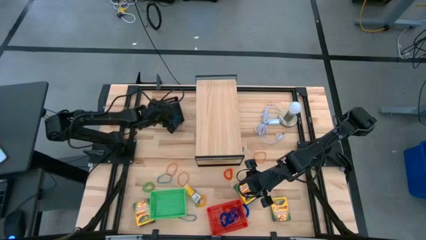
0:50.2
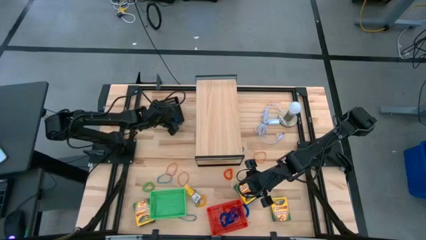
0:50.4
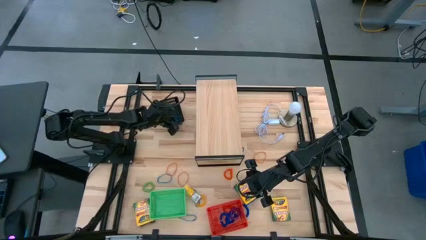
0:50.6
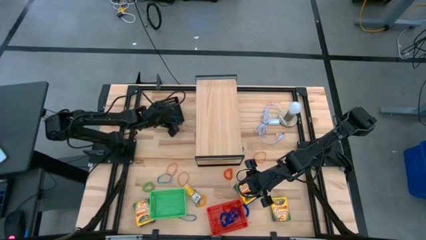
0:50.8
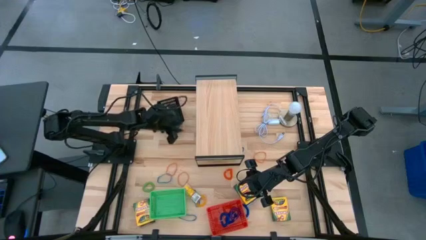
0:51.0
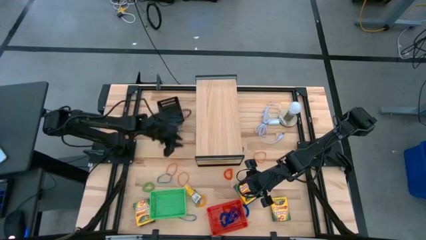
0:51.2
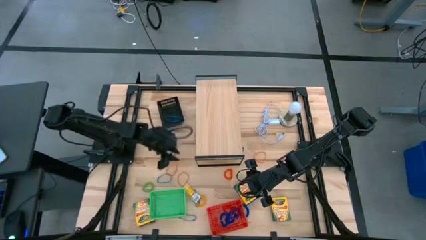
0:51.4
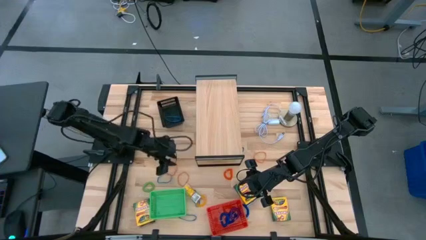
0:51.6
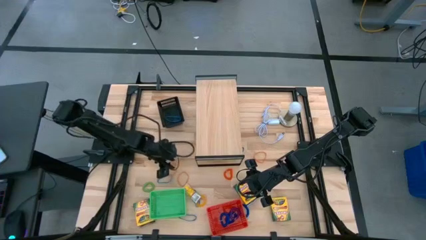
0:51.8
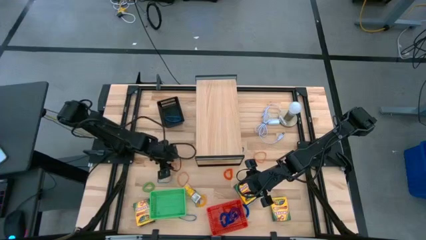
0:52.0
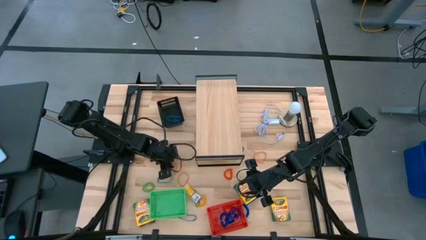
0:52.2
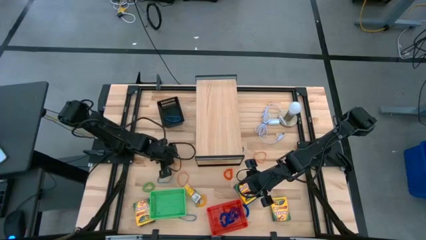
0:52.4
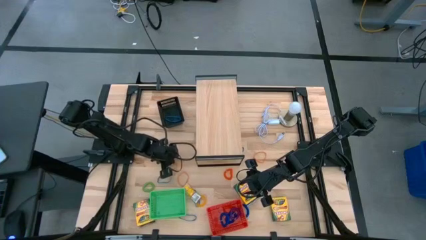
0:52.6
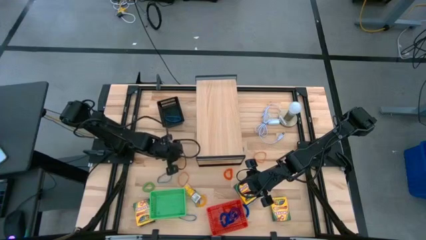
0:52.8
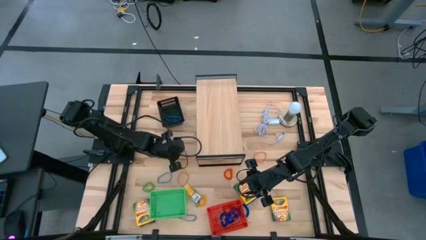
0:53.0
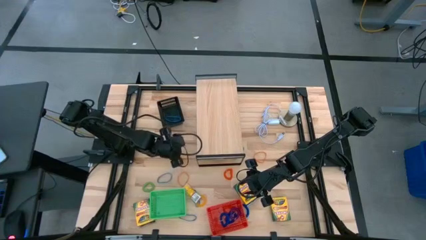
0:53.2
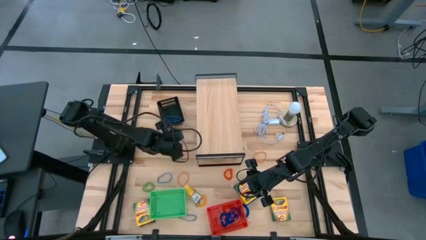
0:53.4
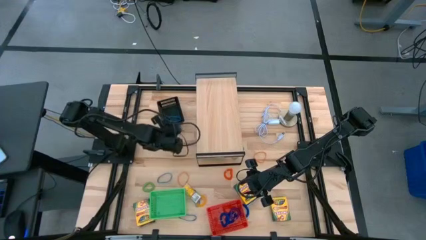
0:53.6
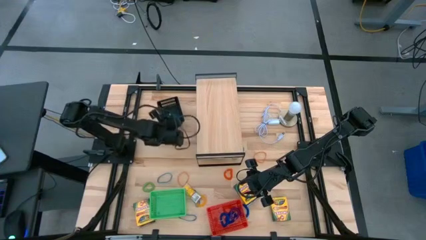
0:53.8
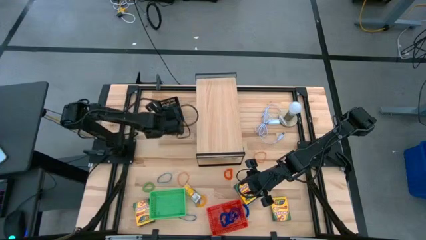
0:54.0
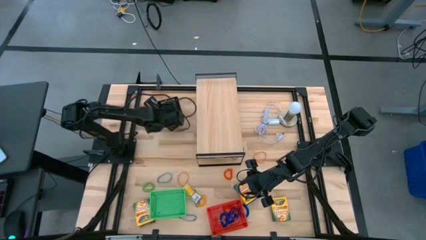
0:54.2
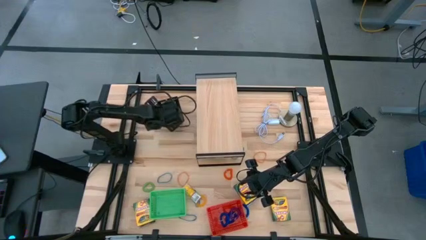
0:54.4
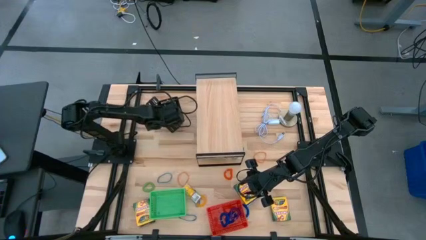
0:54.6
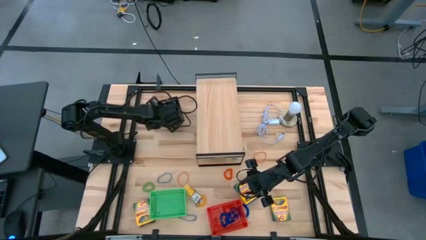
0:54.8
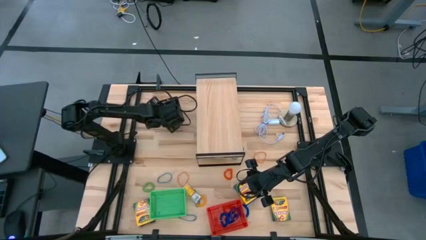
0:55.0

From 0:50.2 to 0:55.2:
Task: Pick & Place Office Desk Supplies
Put the orange rubber band into the black basket

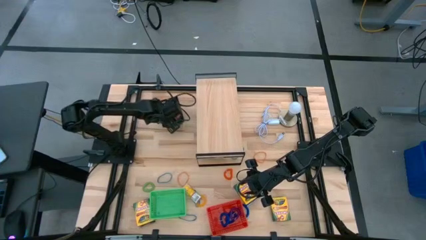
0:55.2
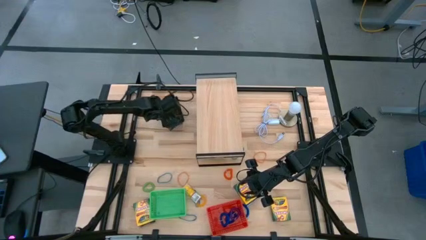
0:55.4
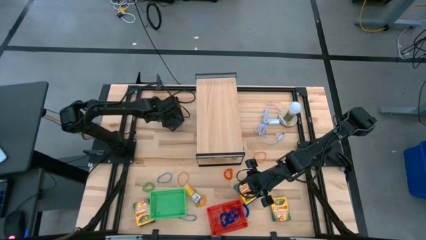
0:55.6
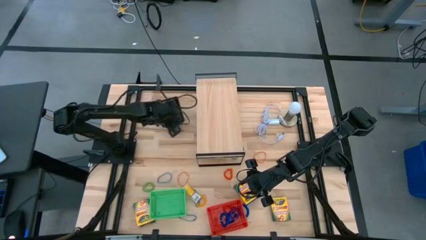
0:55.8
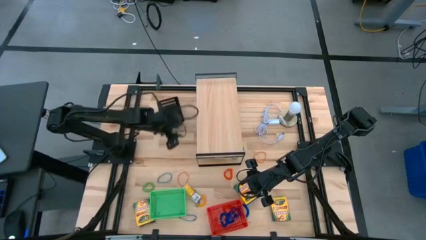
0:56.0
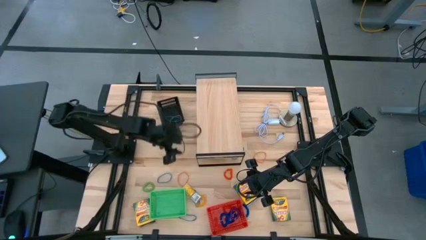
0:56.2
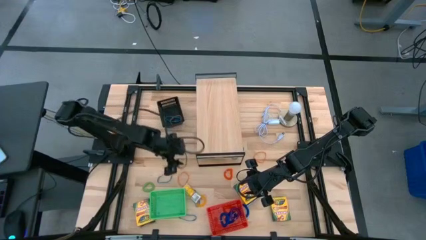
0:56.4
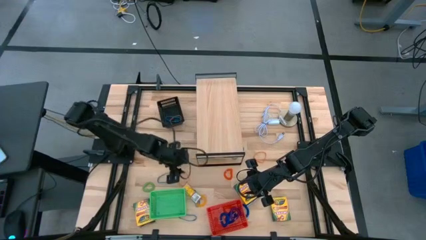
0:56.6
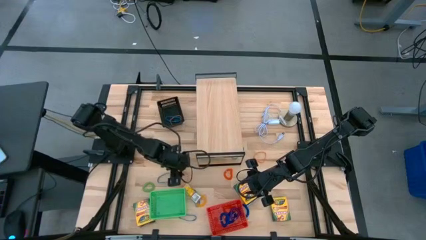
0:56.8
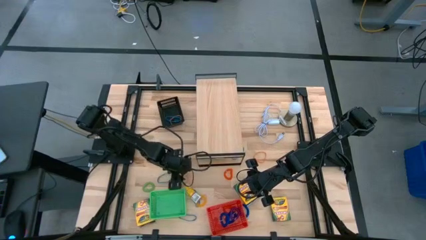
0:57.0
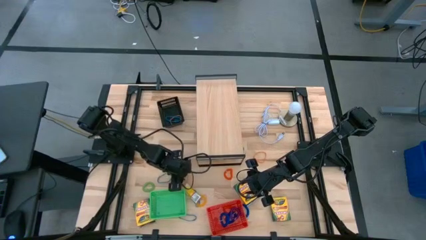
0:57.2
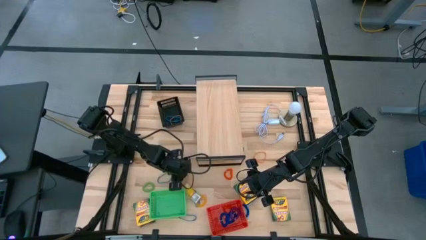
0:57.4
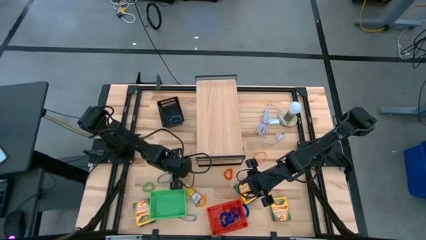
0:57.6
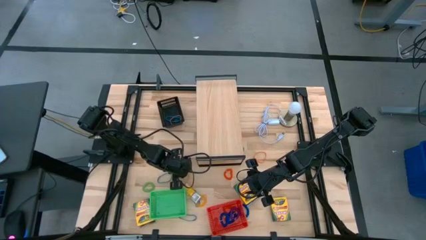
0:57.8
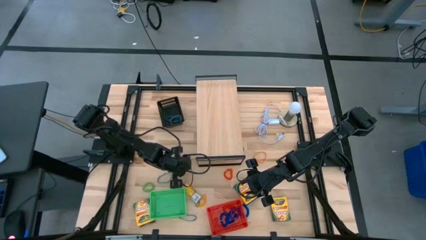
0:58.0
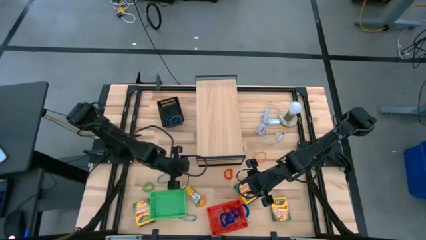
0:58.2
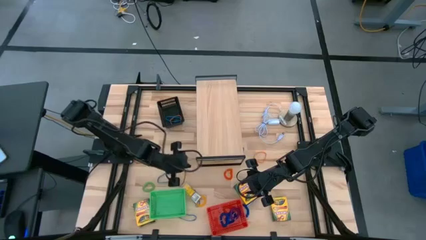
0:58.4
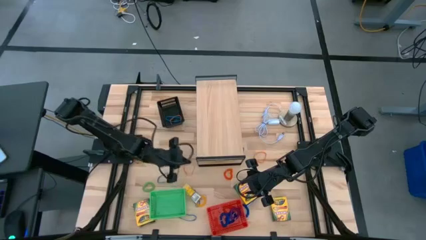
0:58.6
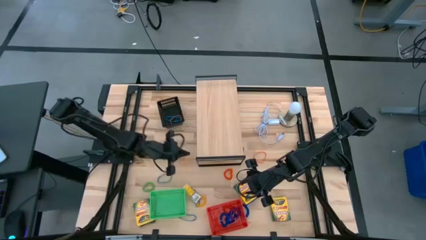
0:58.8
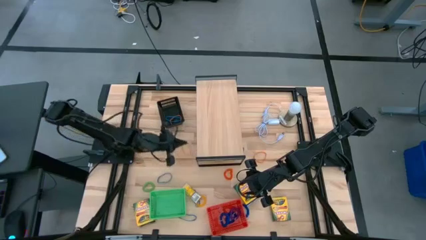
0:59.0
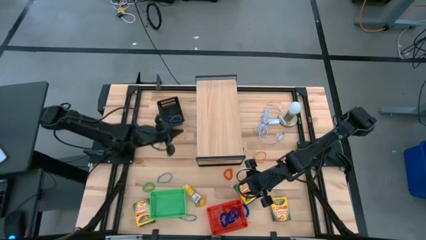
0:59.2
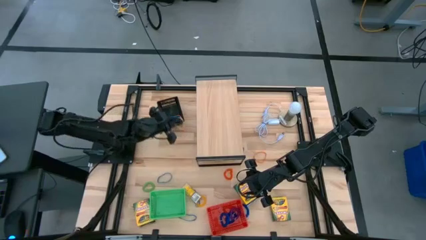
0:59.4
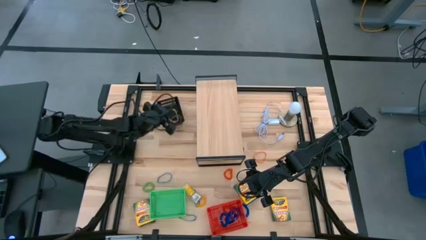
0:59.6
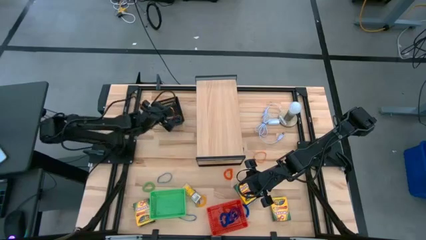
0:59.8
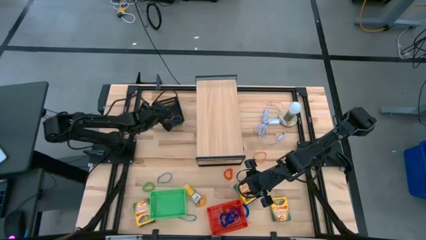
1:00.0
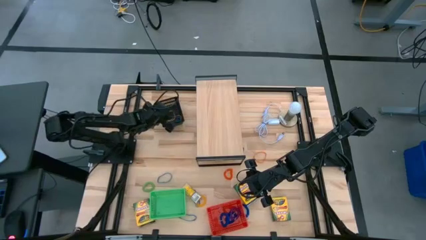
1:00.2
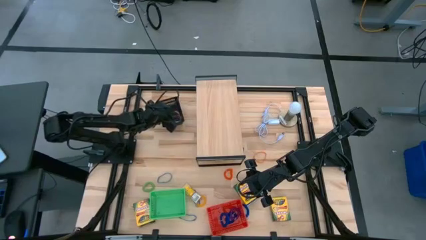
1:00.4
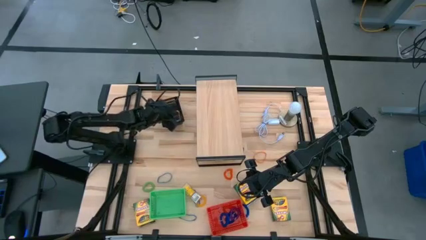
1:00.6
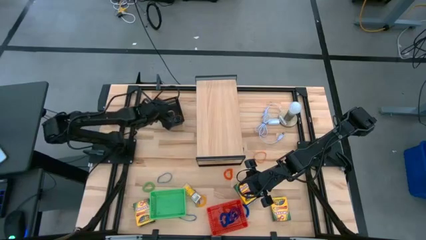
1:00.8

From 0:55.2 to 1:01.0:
Put the orange rubber band into the black basket

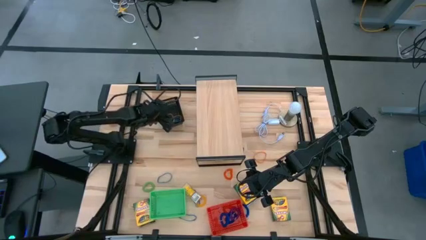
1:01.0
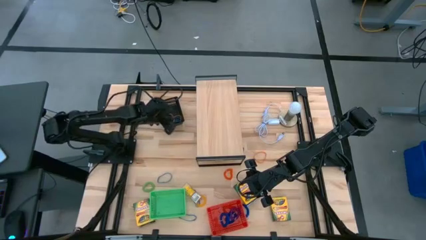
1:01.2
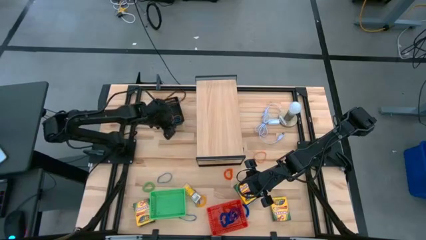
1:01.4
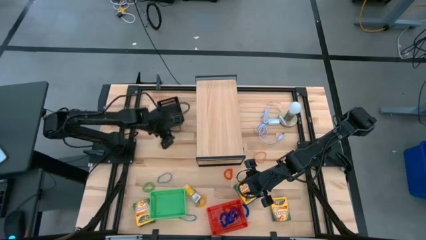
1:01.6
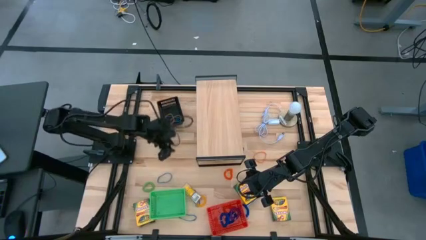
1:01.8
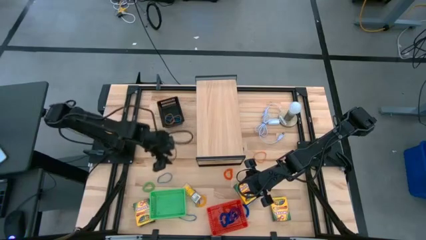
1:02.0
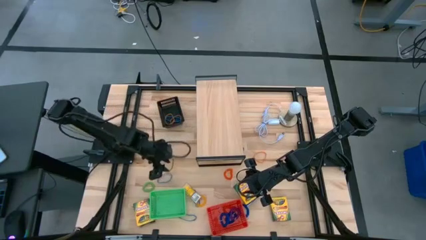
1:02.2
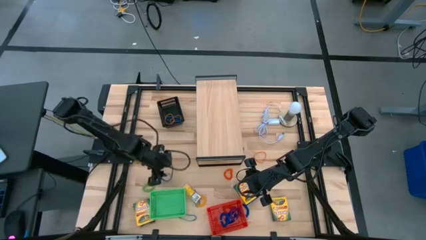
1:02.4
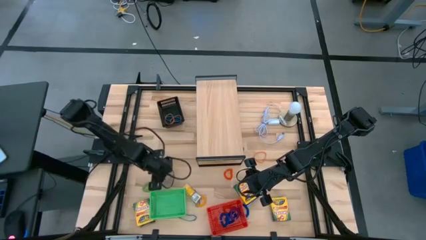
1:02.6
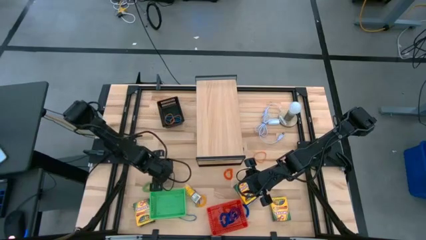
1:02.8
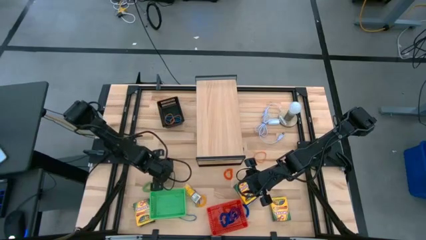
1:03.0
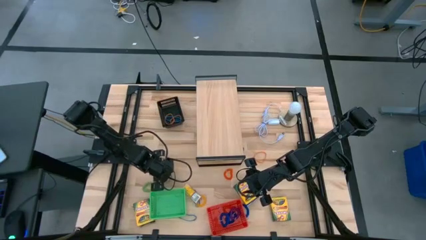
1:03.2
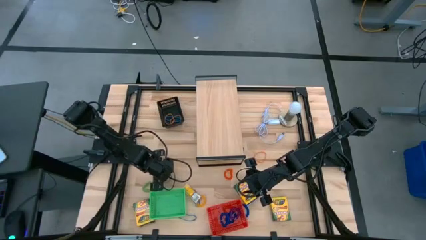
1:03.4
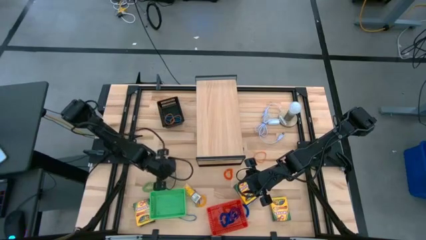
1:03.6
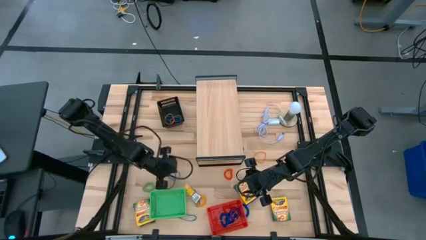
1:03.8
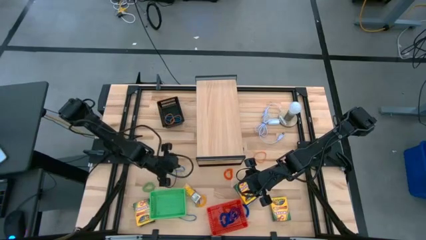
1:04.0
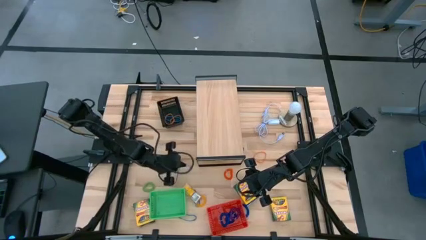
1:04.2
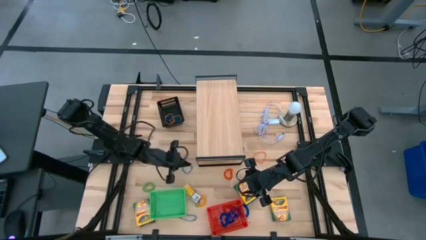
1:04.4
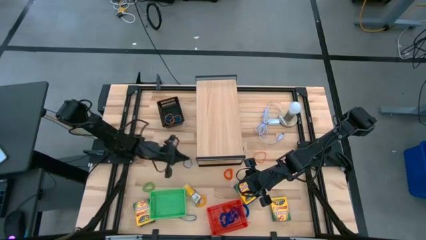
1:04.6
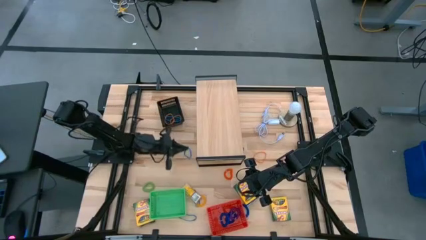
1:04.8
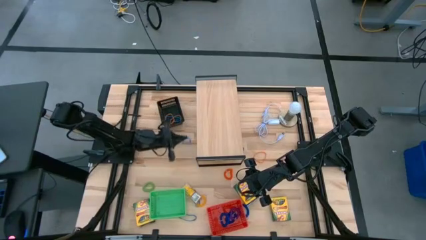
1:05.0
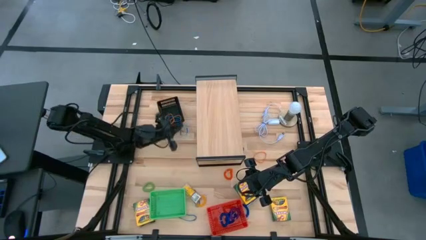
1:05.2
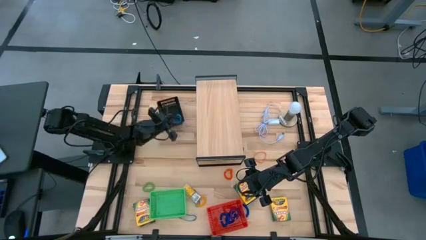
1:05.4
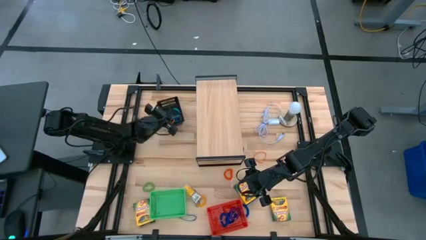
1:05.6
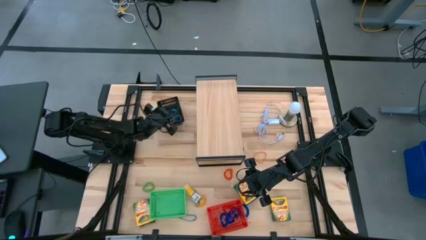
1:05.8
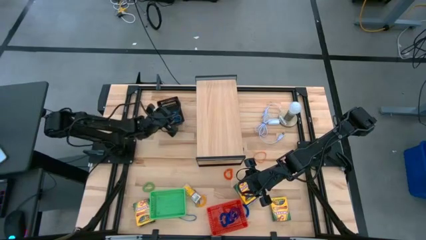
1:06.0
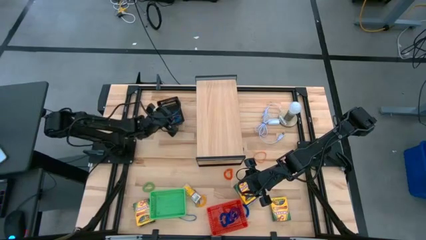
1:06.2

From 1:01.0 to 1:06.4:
Put the blue rubber band into the black basket
